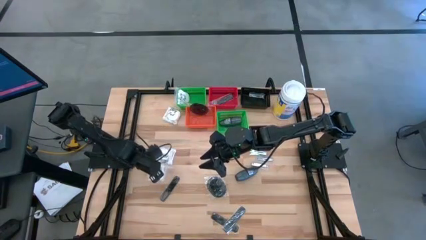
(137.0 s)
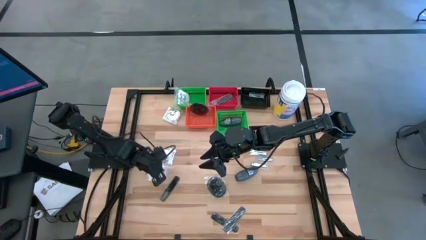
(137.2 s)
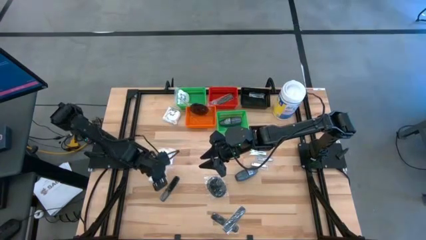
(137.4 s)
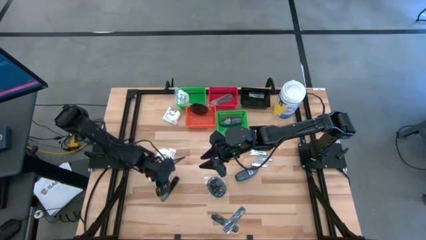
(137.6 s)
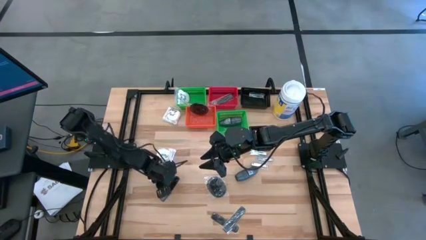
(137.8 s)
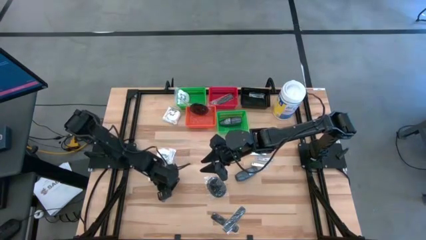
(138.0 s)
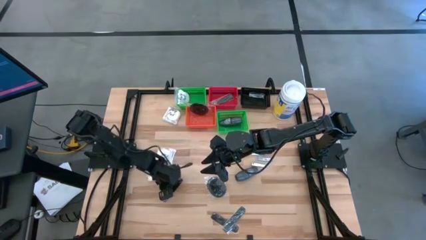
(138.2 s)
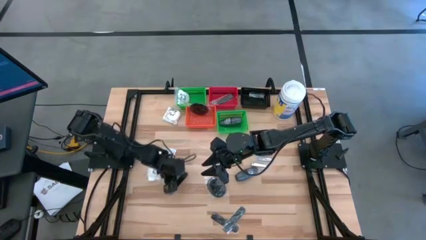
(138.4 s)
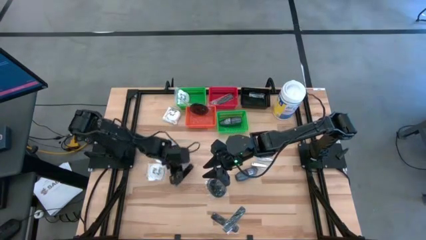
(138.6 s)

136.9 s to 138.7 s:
Task: Pick & Place Travel size toiletries
Adjust the black comb

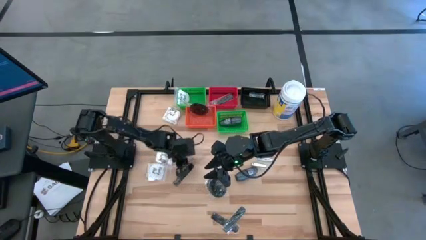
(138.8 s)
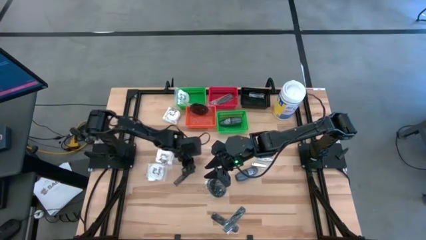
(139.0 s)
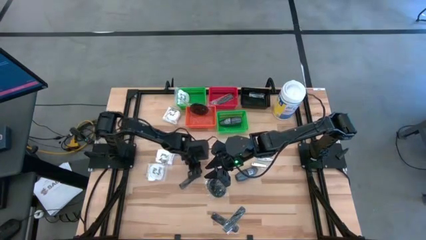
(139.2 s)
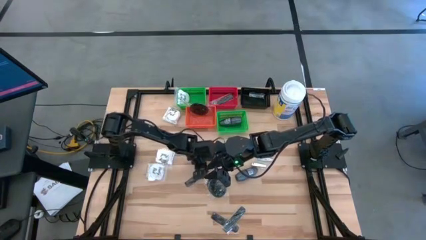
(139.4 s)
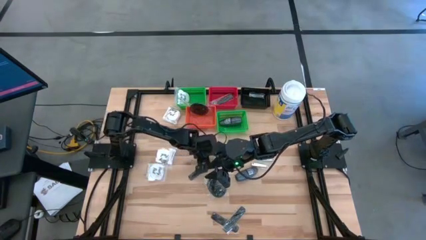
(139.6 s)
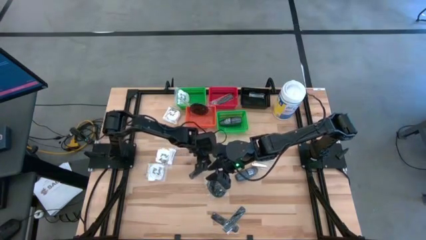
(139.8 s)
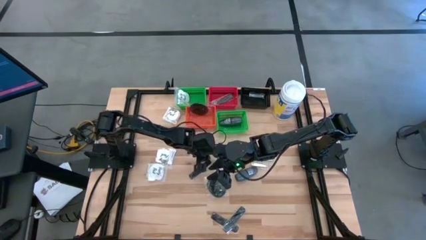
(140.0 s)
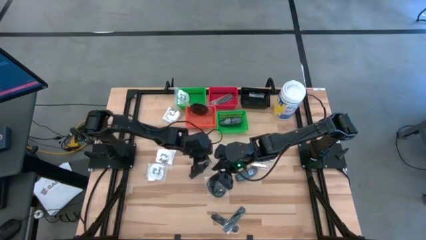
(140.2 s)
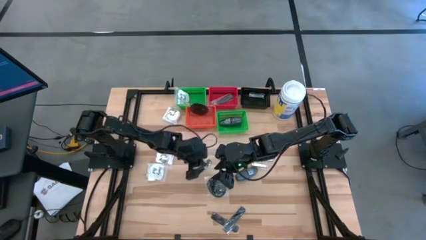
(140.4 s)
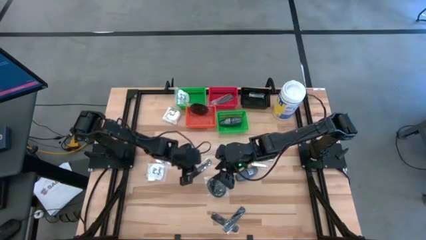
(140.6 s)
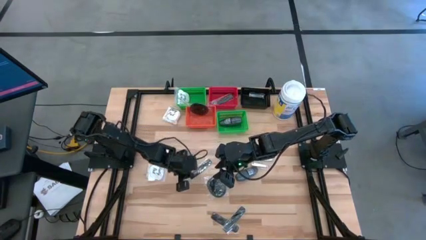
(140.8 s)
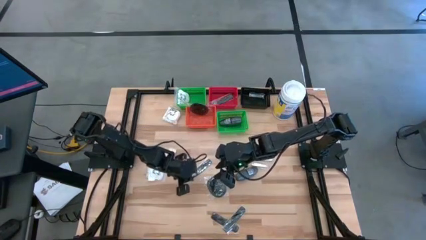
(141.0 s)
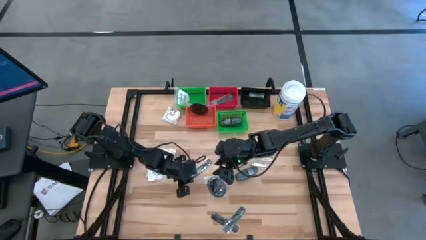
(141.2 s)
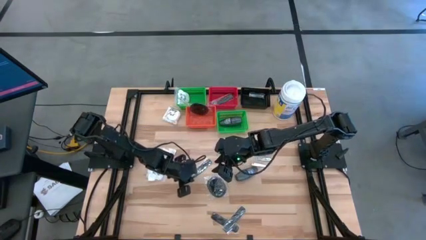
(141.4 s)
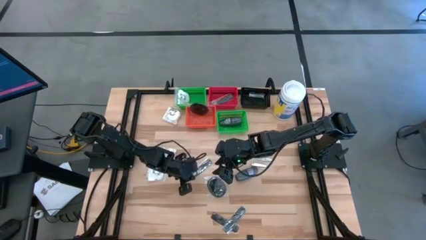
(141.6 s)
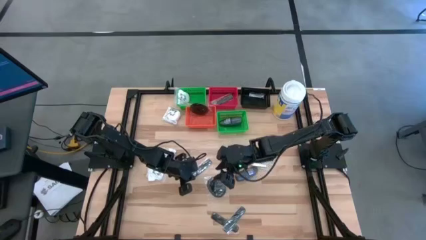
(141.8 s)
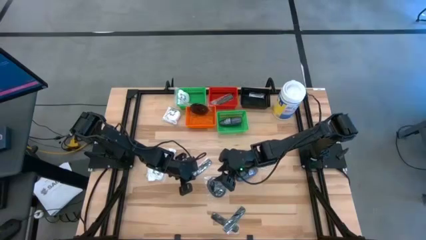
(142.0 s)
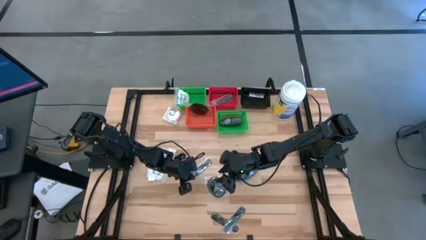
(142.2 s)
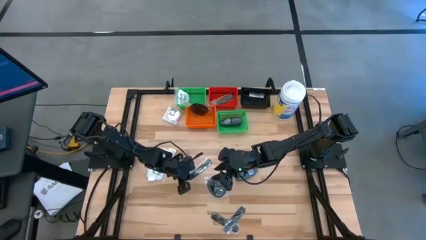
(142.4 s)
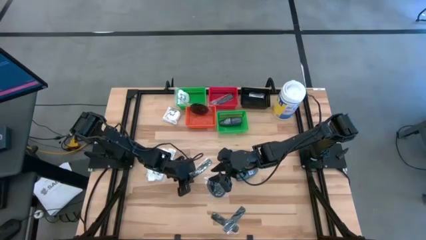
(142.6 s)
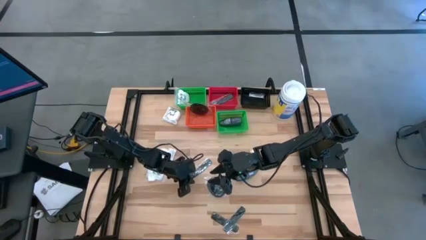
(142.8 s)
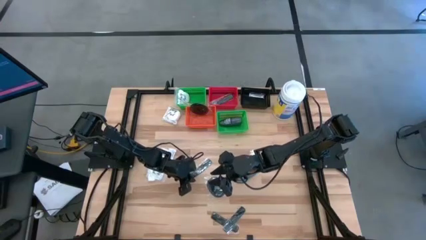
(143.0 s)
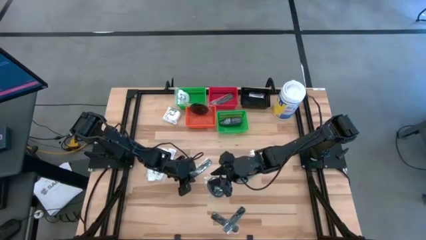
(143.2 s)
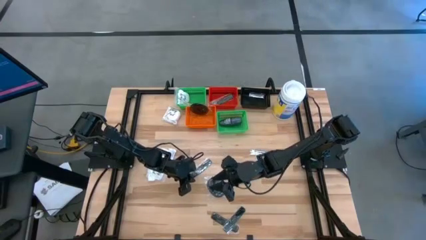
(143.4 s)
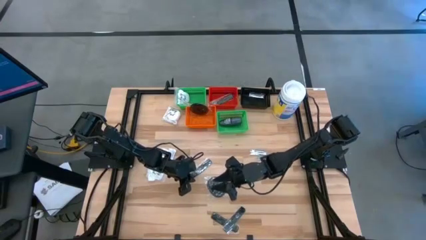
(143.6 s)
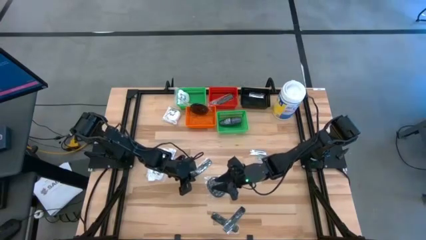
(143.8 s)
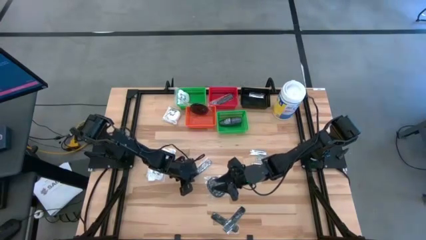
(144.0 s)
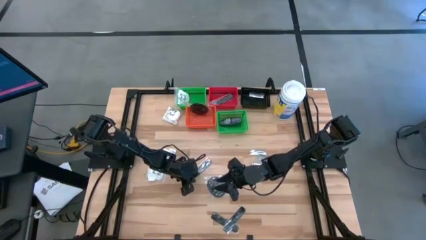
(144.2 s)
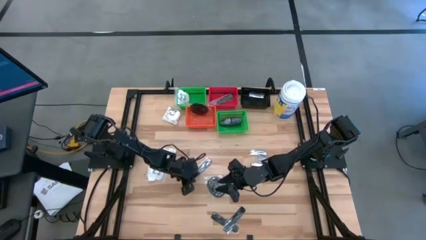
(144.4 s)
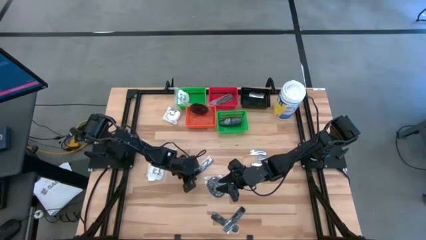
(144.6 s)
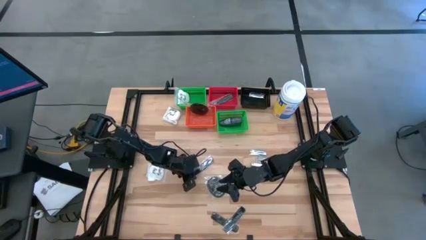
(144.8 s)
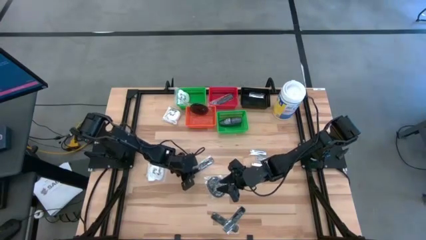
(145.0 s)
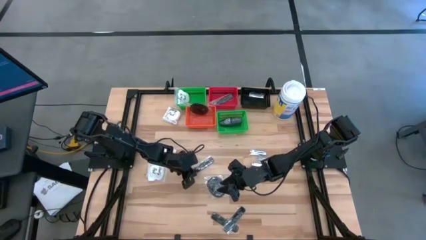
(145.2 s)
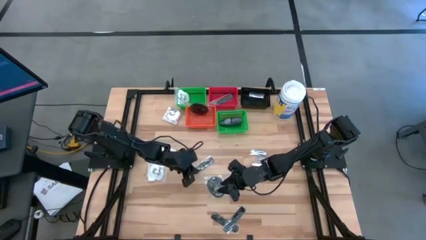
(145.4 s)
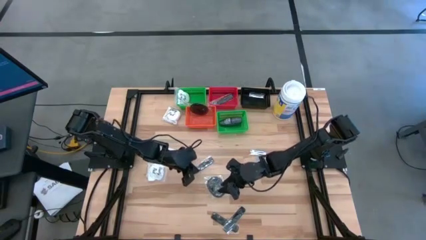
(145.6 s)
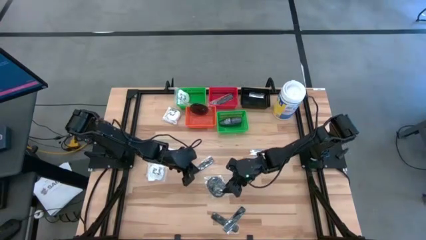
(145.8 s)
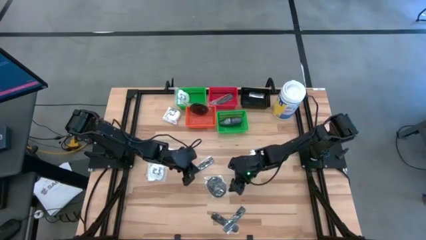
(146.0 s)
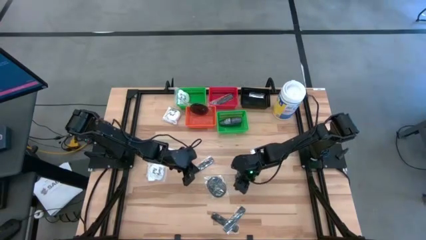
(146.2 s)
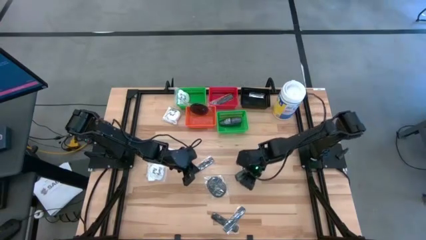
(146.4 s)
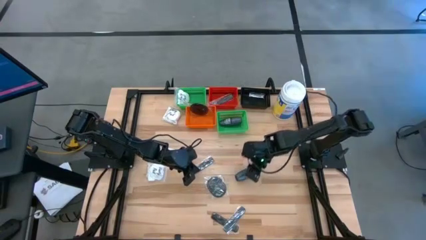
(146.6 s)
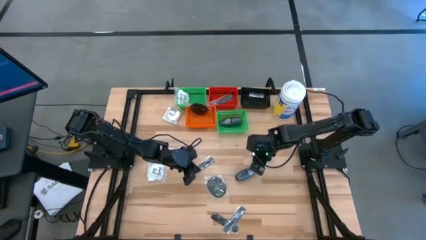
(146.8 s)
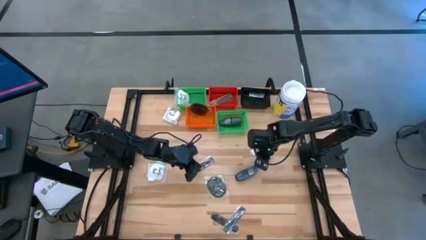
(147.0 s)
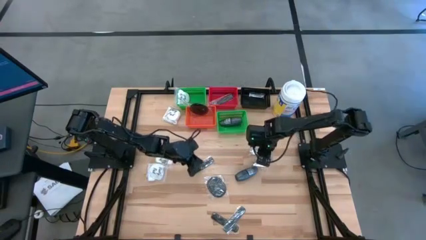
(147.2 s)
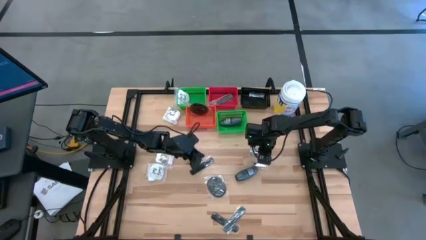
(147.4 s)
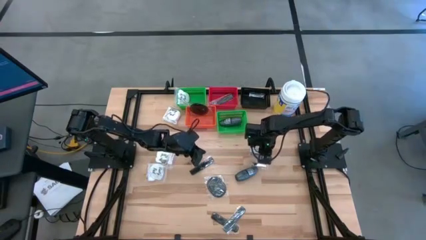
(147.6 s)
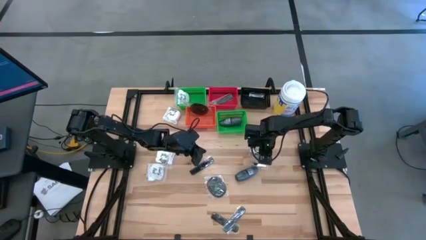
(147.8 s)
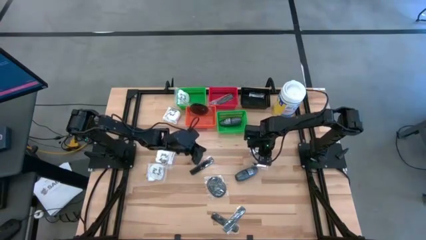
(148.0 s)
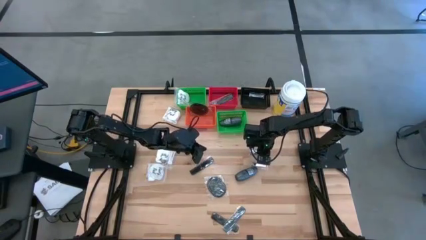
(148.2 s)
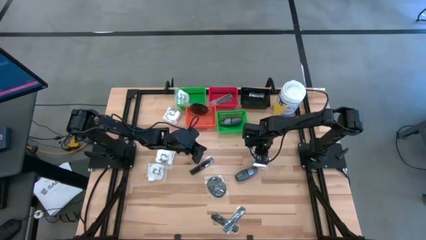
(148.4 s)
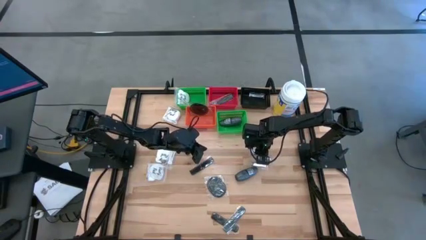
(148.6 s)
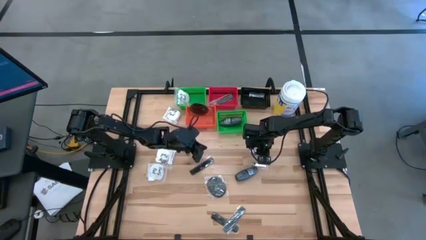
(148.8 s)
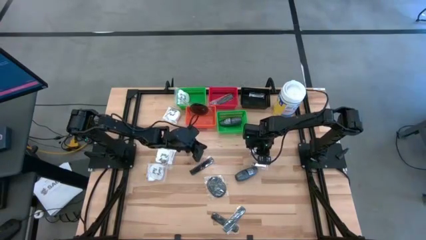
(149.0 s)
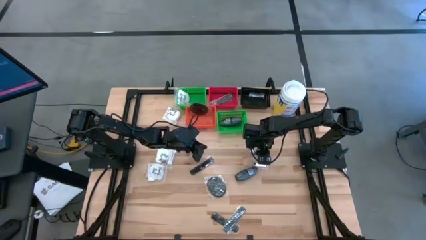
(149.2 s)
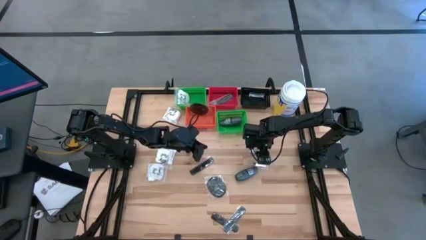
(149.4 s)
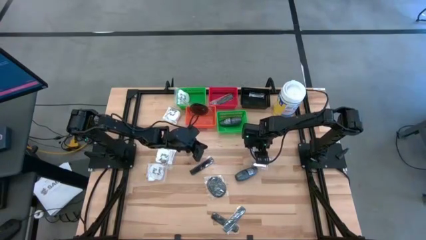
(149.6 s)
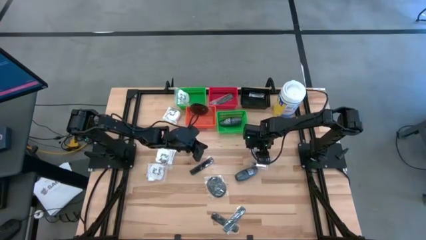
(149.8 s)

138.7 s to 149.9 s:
Put the nail cutter into the black bin

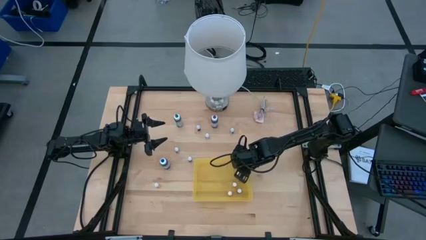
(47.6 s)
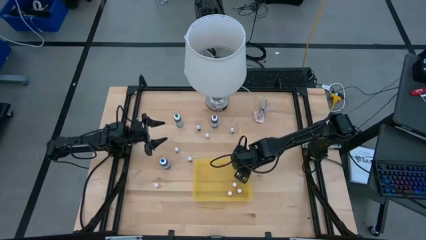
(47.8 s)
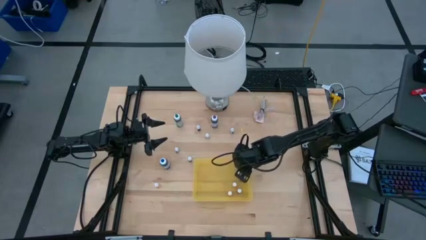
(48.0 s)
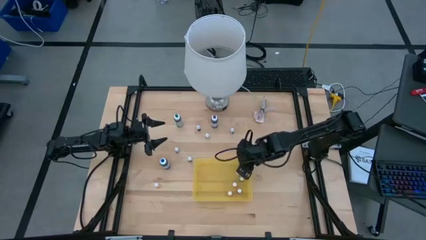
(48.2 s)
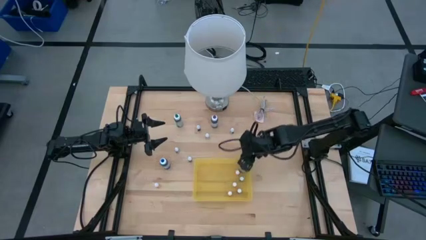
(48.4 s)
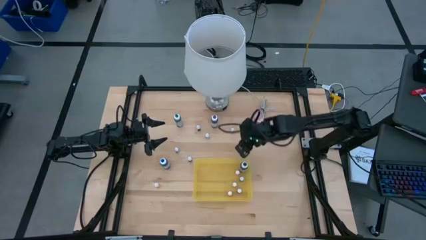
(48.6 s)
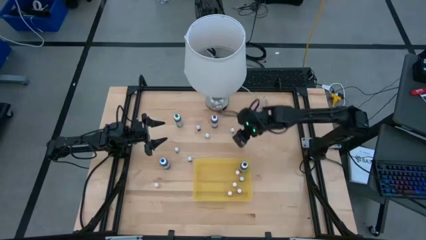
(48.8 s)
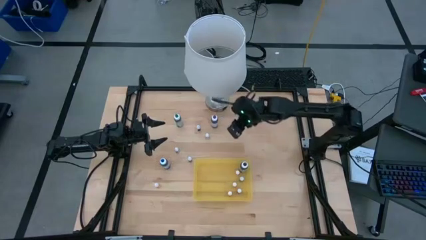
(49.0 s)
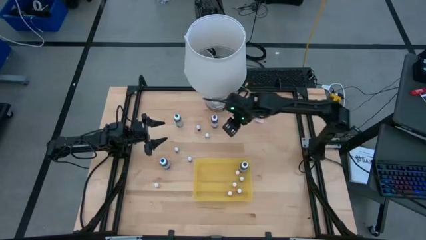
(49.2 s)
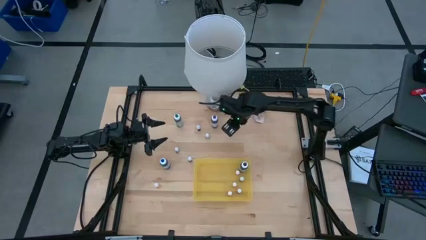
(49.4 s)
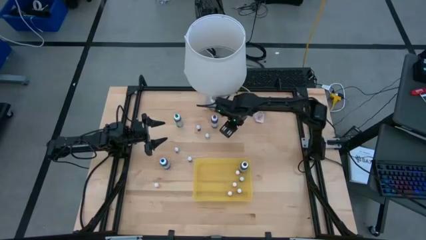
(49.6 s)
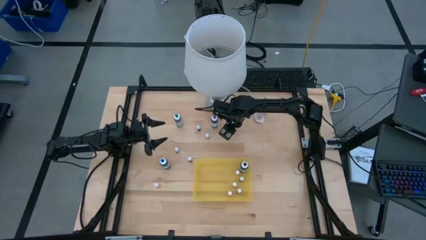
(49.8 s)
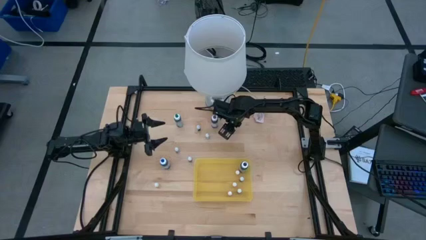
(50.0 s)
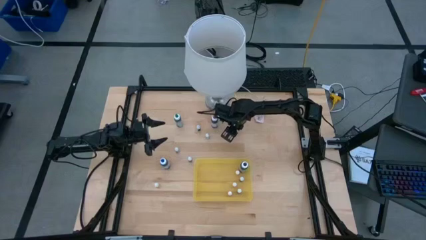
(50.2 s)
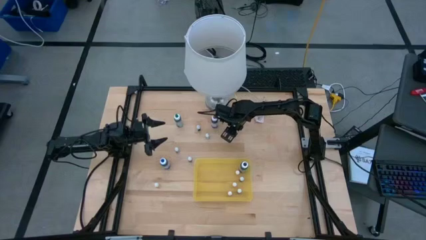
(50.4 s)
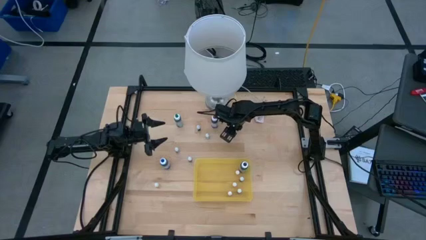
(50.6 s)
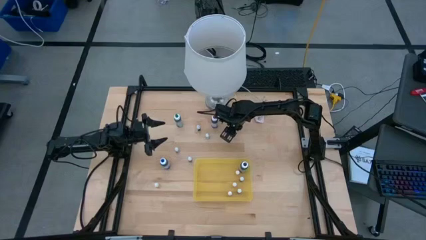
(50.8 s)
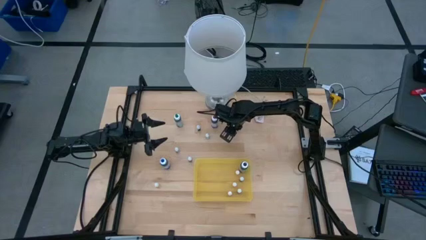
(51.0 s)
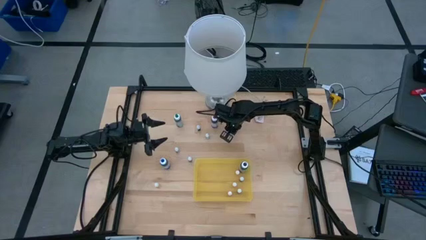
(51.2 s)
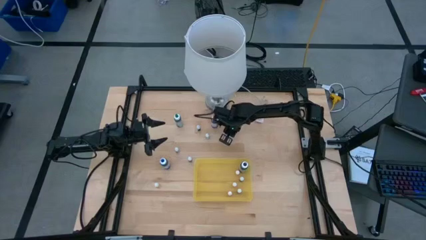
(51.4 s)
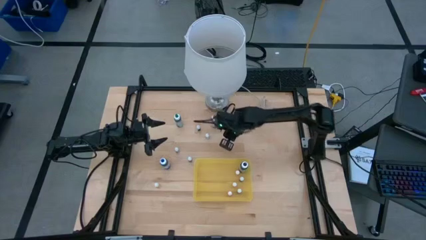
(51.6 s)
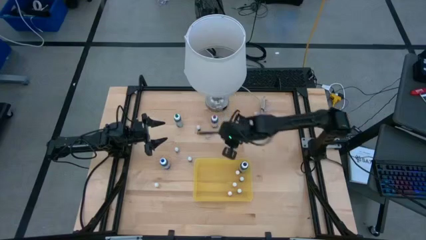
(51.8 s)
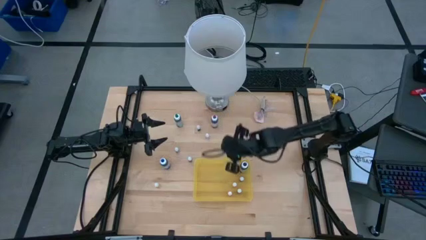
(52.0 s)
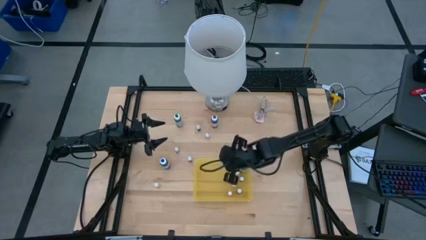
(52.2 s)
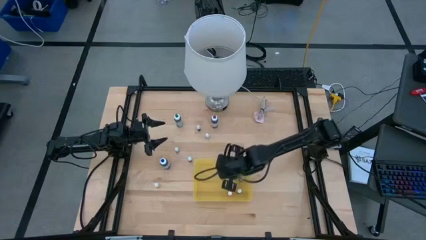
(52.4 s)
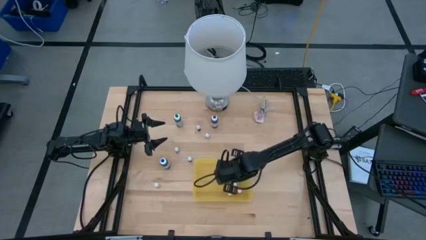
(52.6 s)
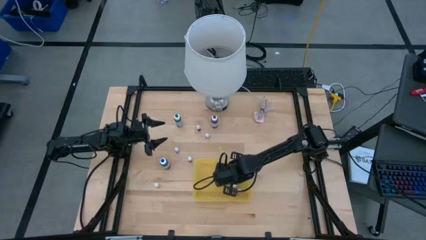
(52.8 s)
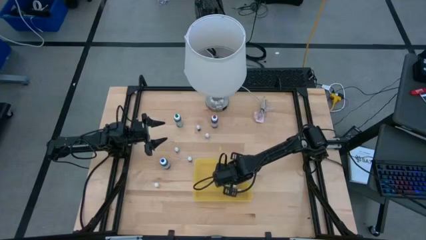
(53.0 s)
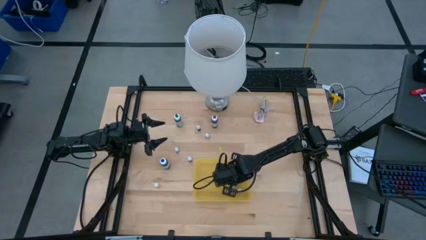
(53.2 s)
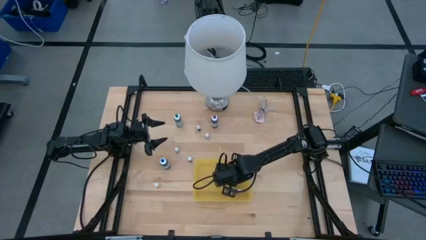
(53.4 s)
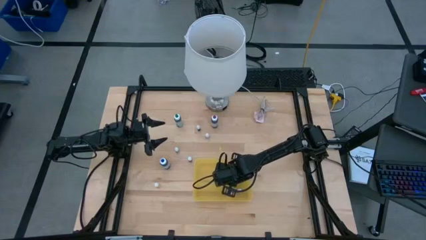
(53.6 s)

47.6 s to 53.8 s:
Task: Pick & Place food coloring
Put the right small blue food coloring bottle into the transparent bin
